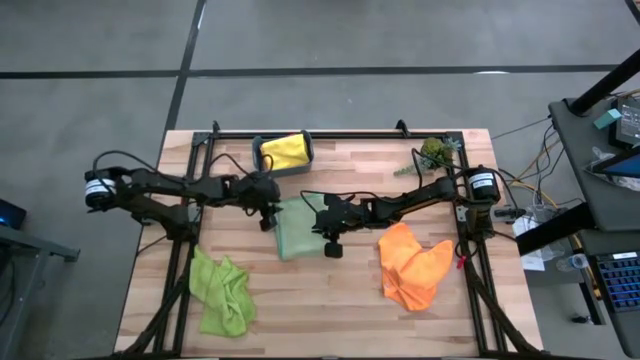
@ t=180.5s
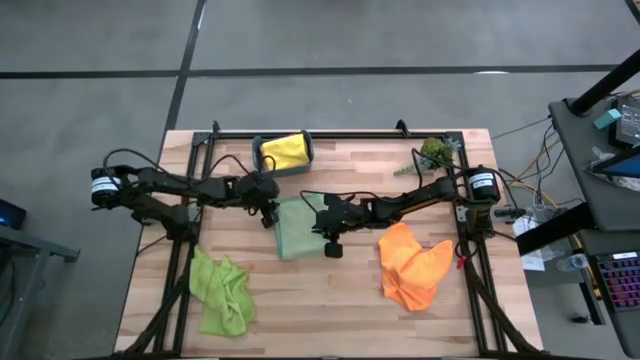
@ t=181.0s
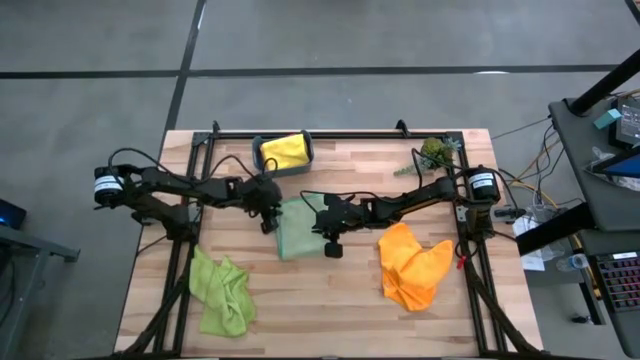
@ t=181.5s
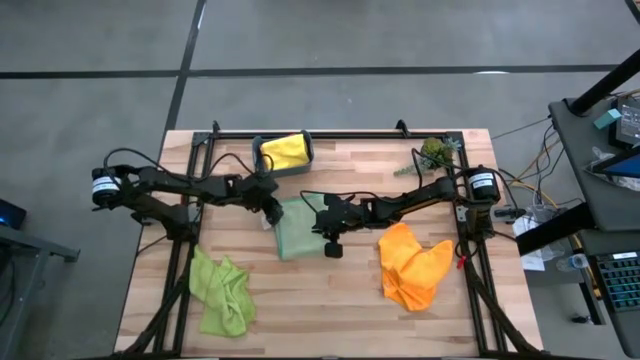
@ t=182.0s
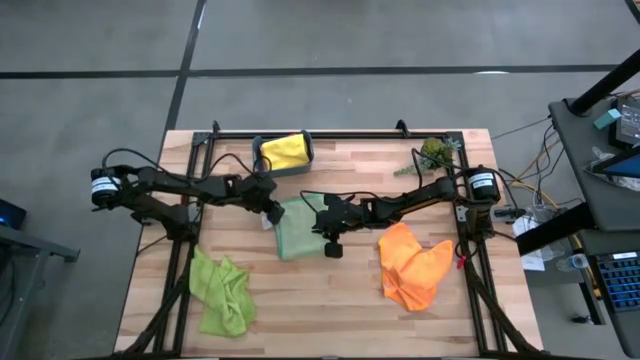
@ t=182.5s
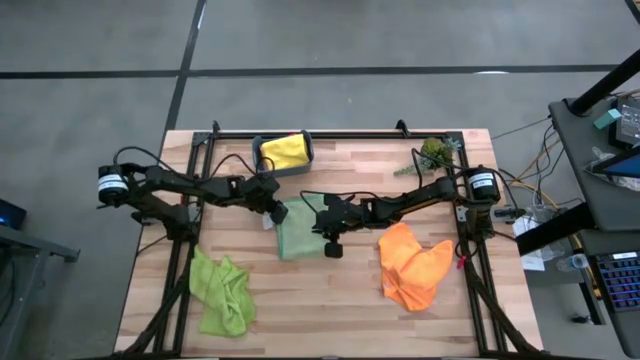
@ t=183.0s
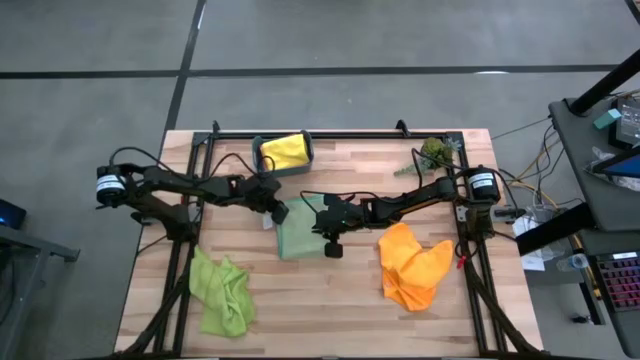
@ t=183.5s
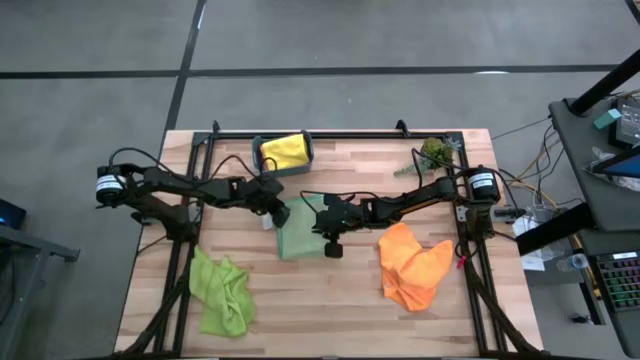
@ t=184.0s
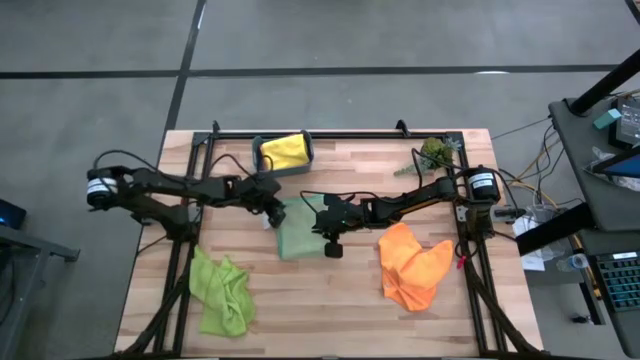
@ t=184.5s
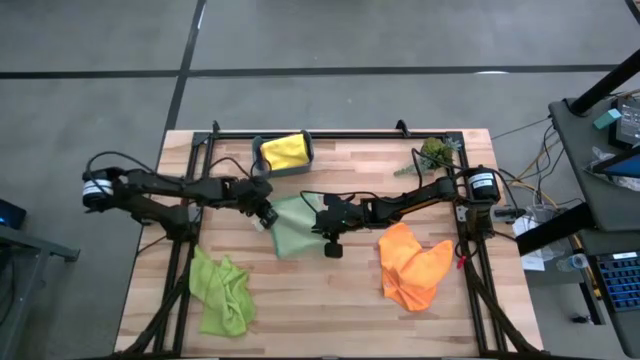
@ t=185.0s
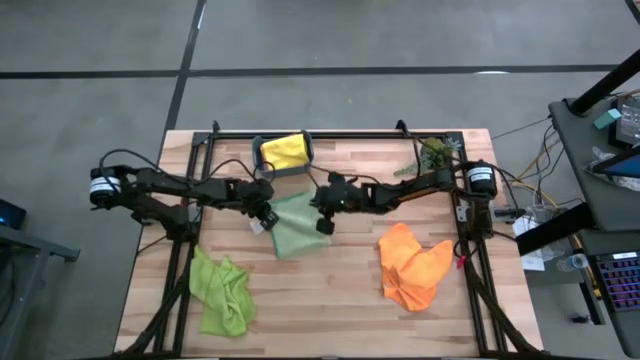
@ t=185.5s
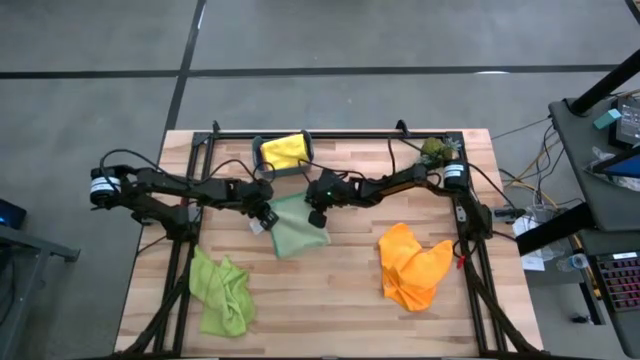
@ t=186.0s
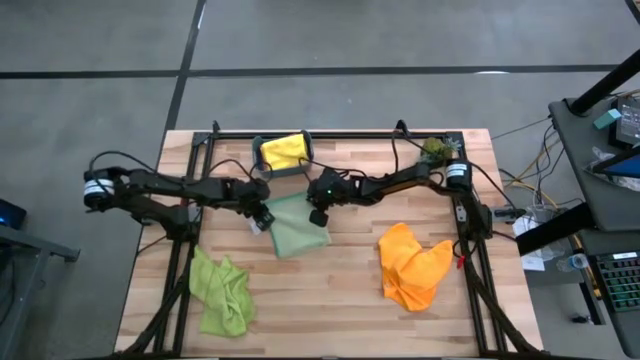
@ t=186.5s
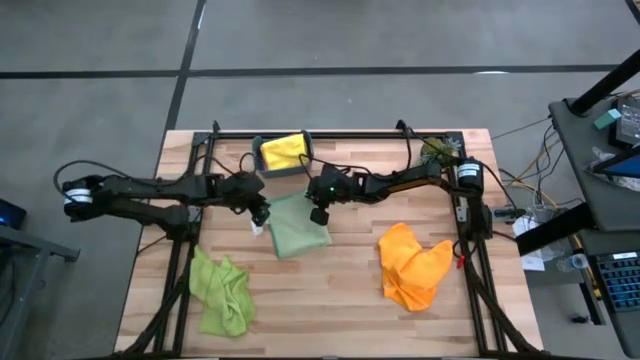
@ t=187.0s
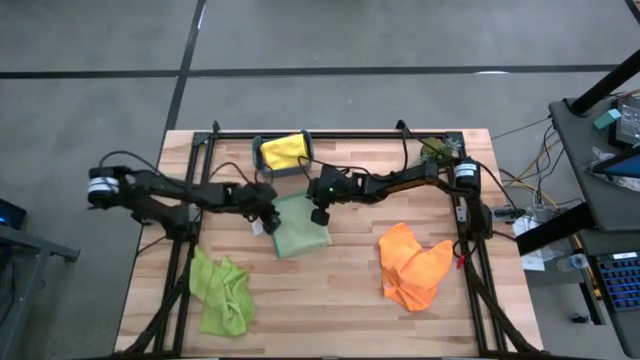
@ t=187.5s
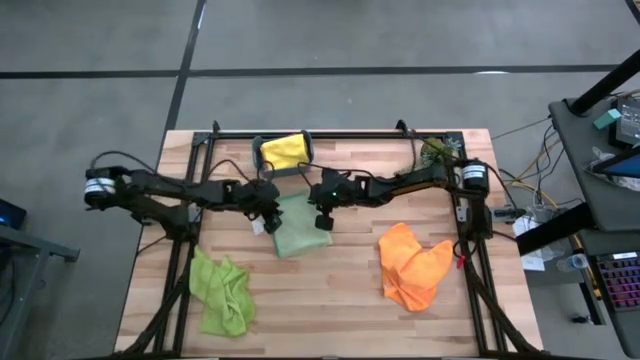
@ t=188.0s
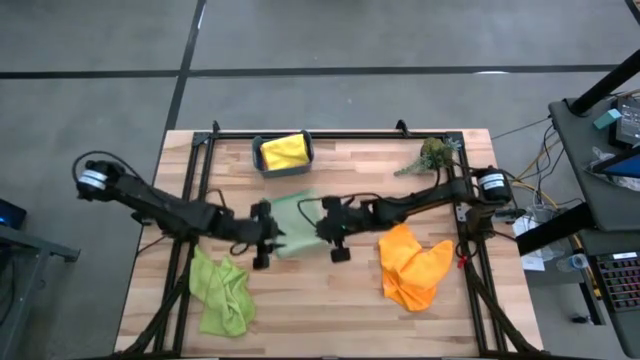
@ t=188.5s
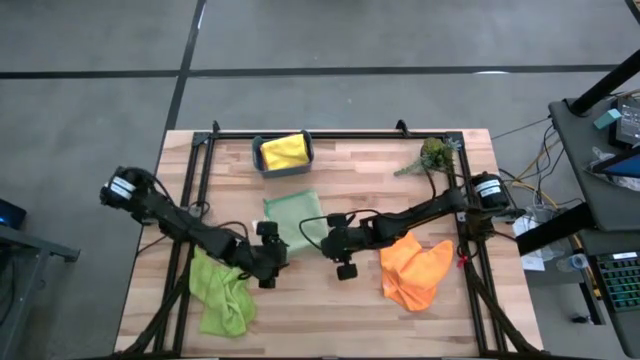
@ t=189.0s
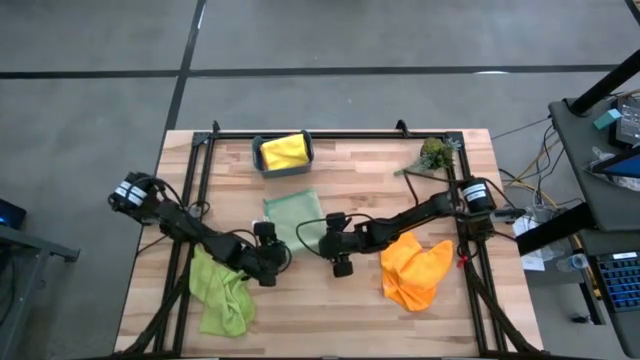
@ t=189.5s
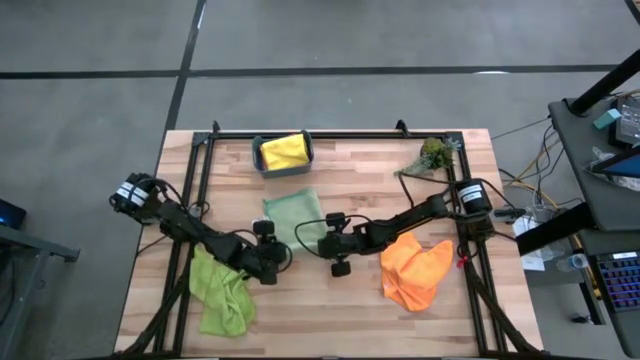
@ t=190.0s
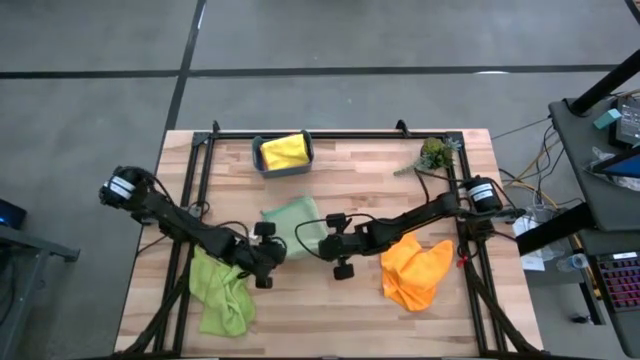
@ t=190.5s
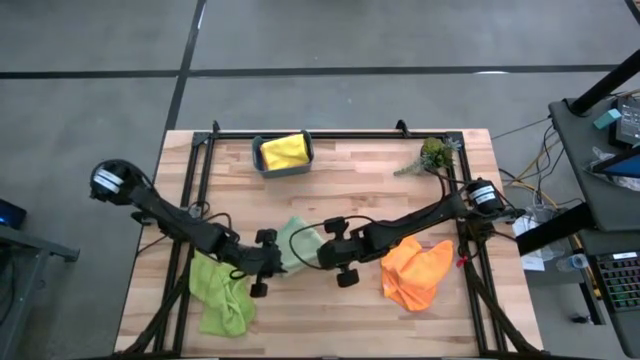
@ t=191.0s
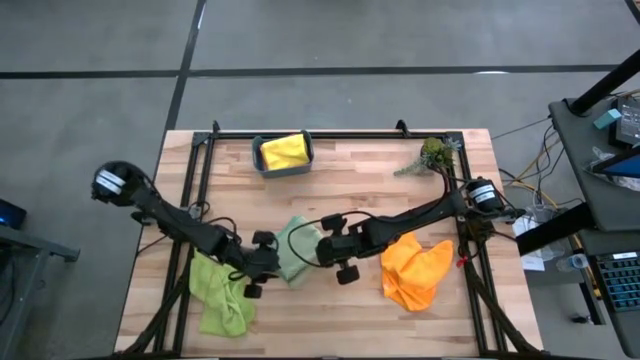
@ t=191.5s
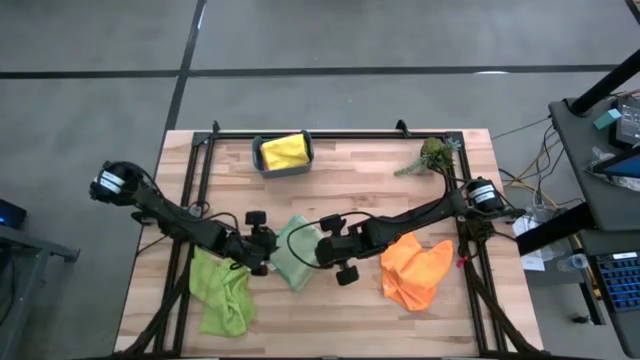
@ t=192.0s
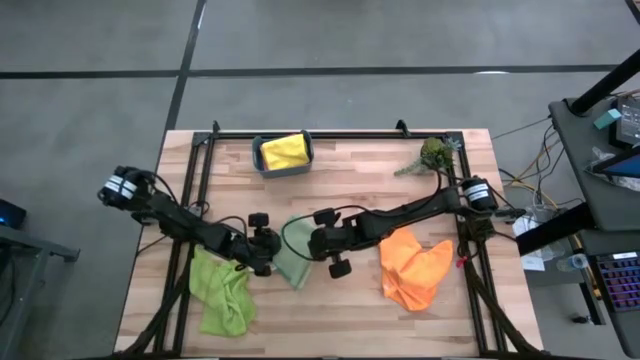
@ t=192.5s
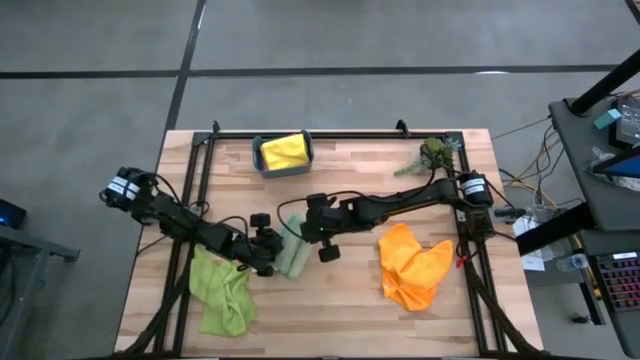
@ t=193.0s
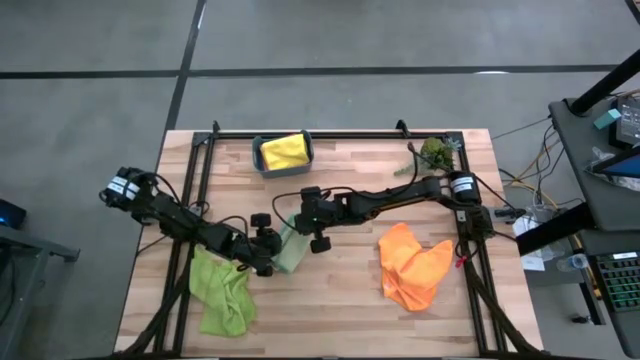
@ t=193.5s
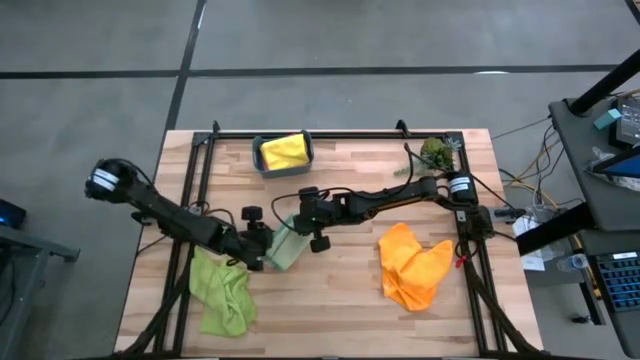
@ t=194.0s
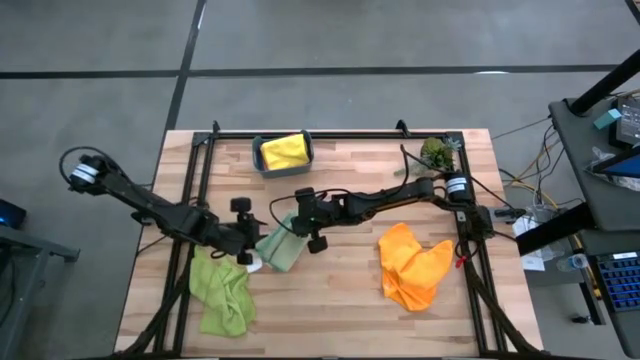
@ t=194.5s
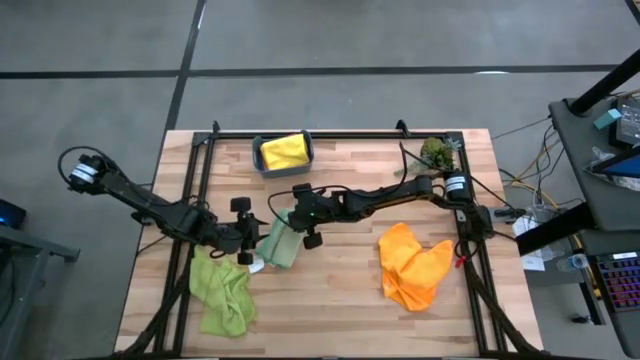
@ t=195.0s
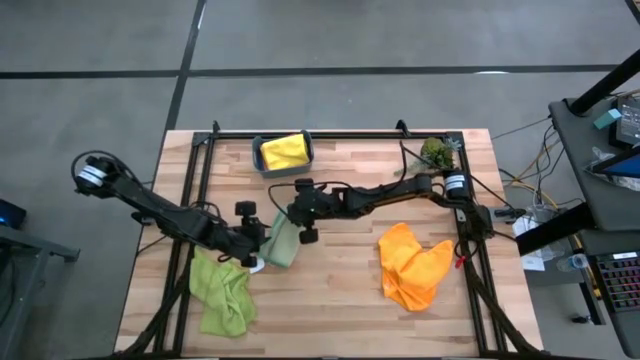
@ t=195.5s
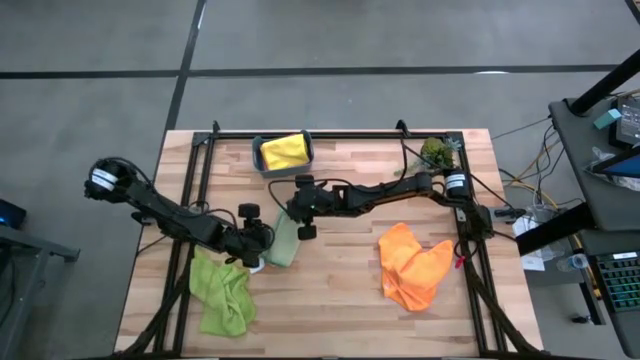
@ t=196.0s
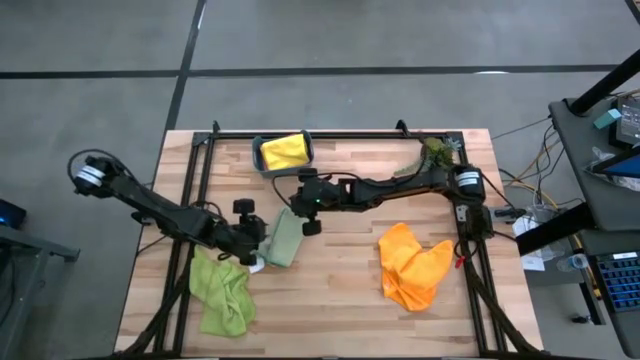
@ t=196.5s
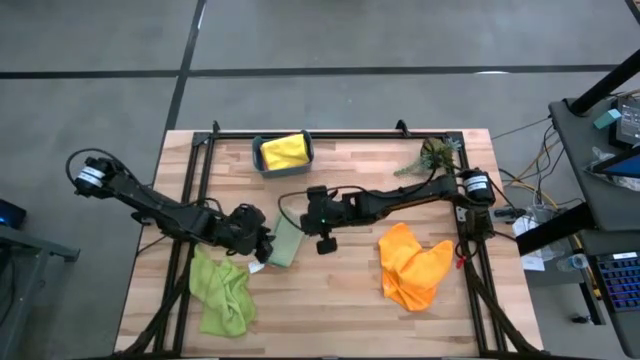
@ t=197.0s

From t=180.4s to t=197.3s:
Task: Fold microfiber towels
Fold the green microfiber towel

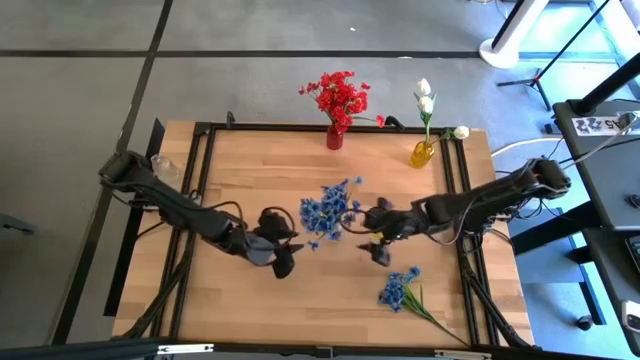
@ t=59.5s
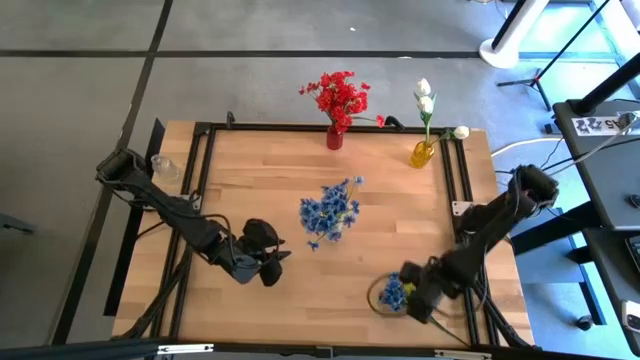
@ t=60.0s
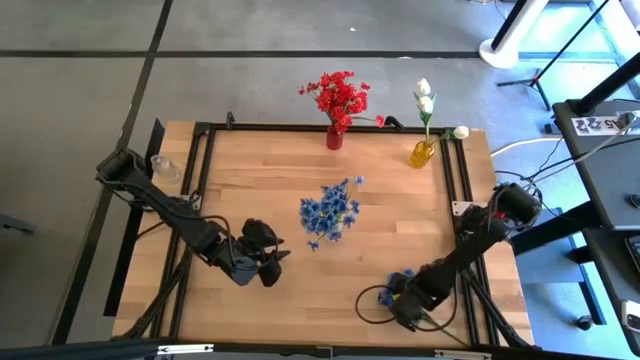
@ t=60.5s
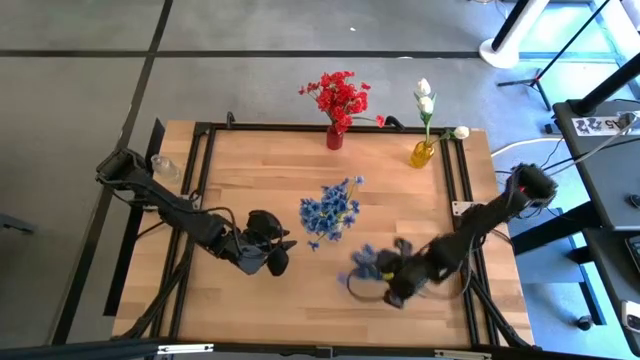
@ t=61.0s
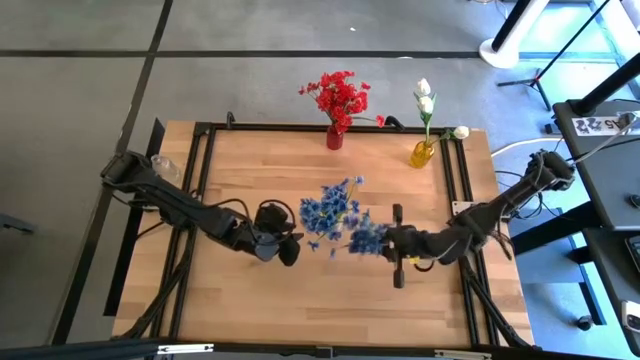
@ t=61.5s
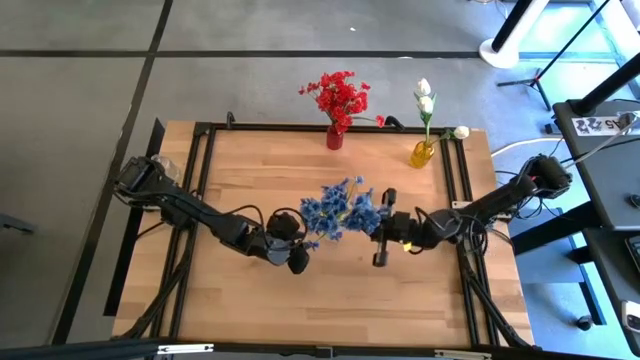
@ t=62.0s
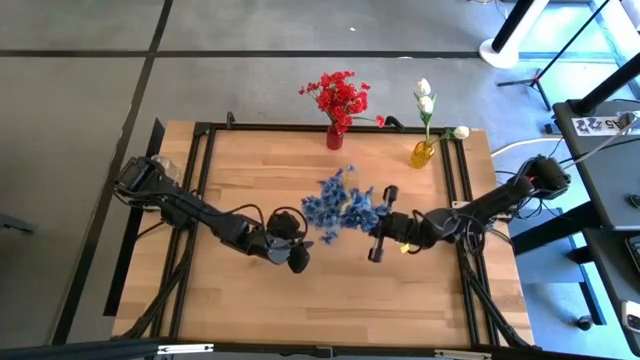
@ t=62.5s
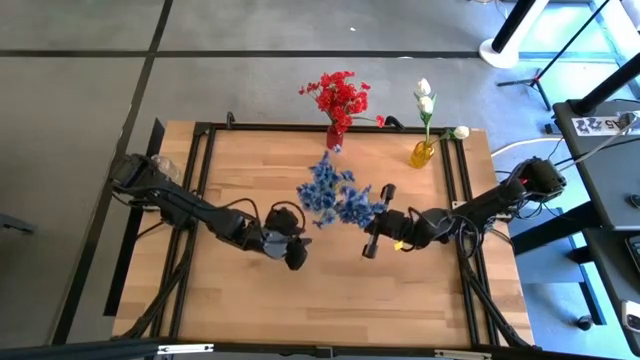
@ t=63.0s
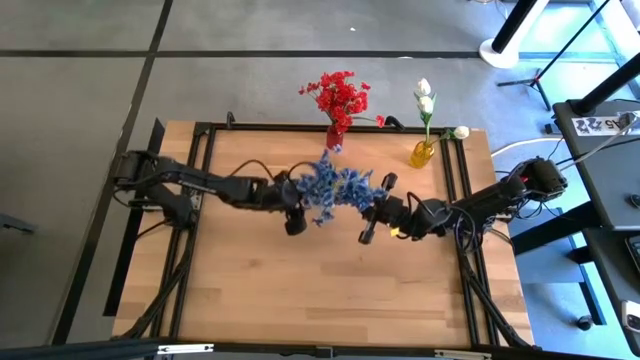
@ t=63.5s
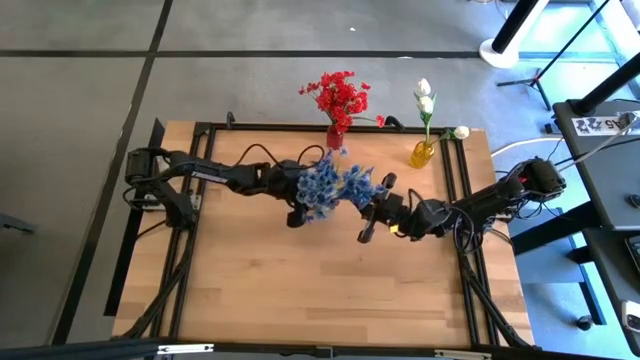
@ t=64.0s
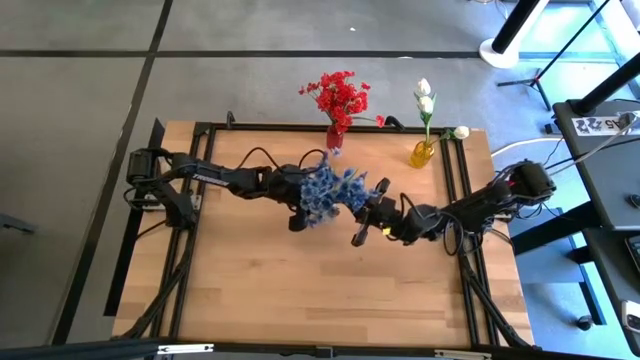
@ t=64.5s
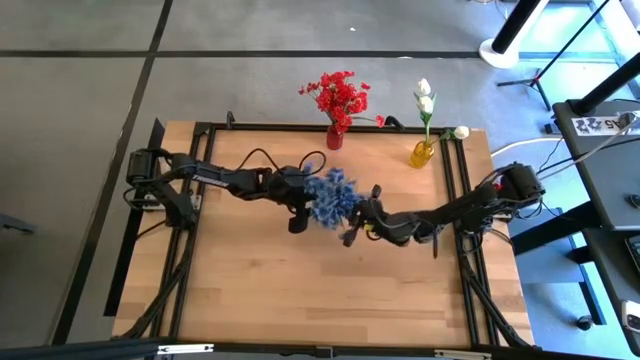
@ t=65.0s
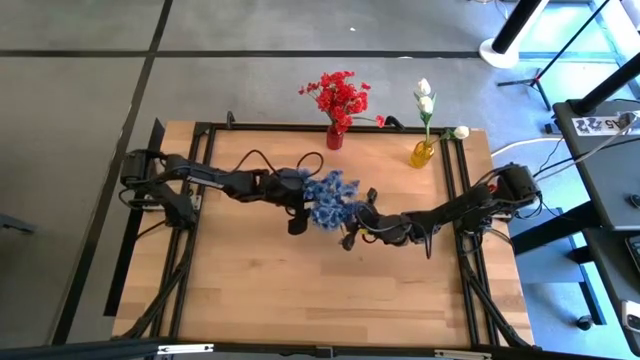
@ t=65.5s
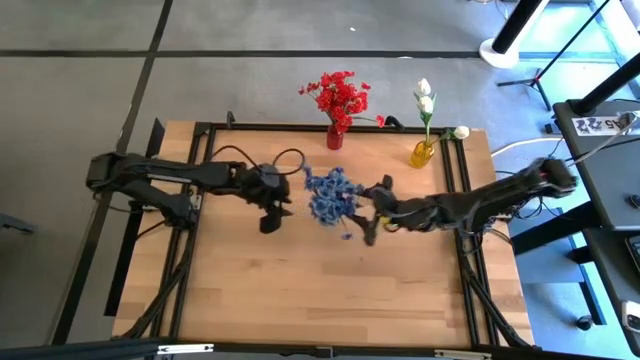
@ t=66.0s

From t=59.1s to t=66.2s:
Task: Sort flowers into vase by color
Put the blue flower into the transparent vase
